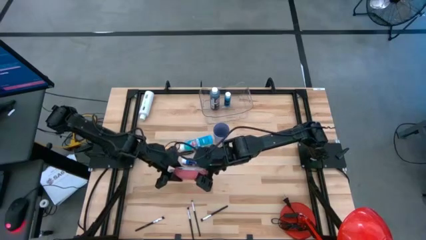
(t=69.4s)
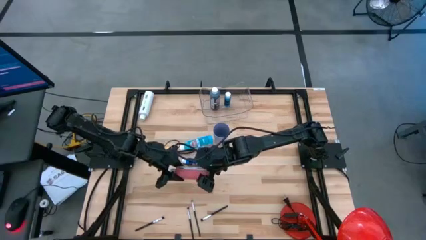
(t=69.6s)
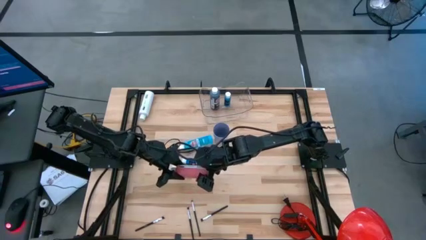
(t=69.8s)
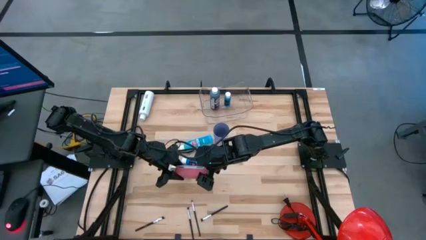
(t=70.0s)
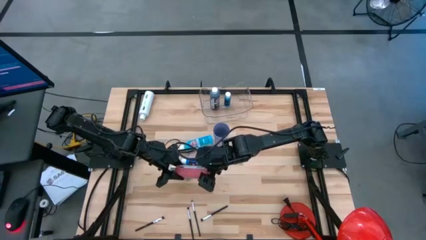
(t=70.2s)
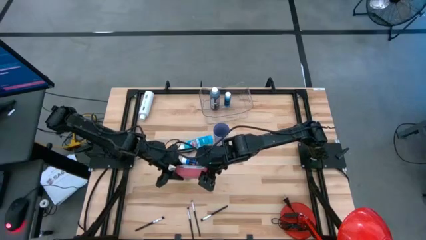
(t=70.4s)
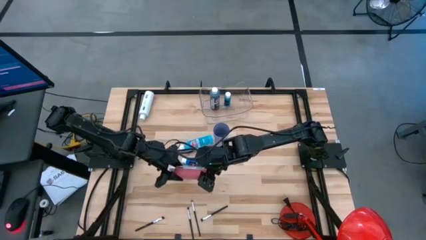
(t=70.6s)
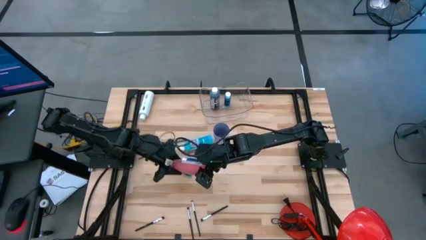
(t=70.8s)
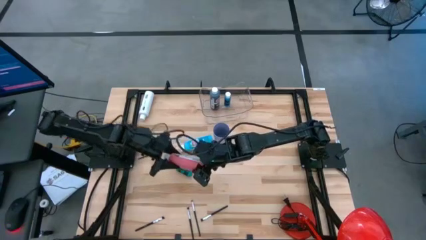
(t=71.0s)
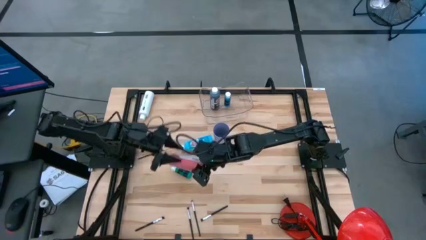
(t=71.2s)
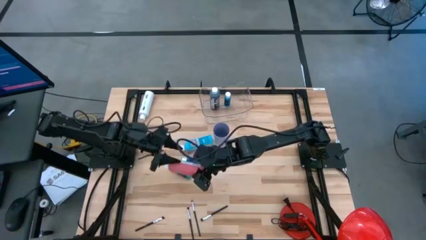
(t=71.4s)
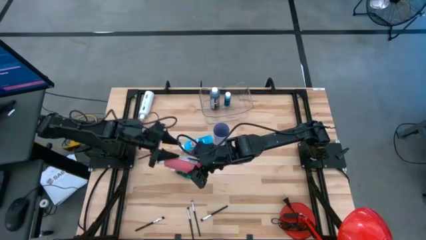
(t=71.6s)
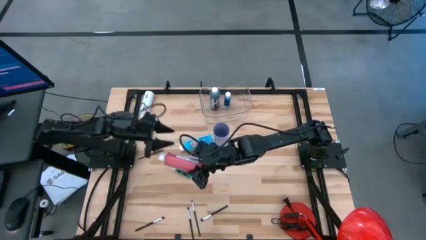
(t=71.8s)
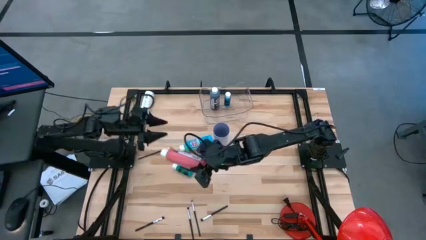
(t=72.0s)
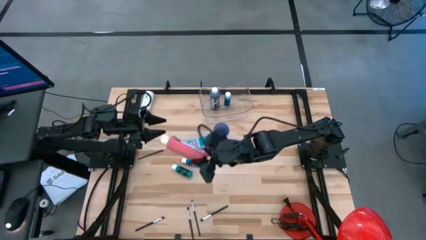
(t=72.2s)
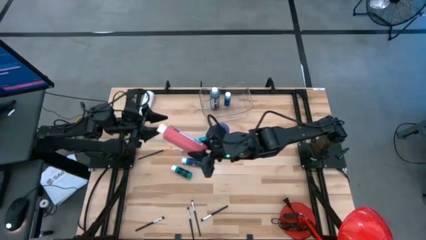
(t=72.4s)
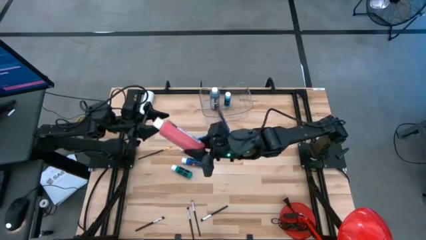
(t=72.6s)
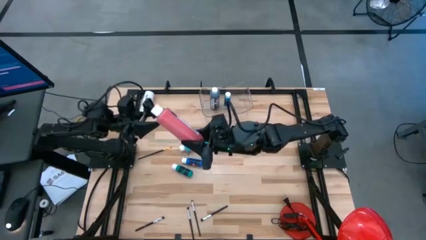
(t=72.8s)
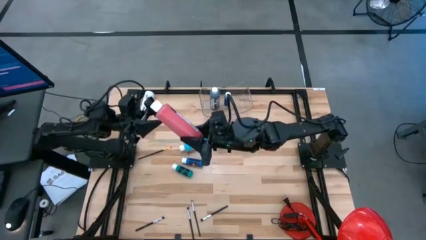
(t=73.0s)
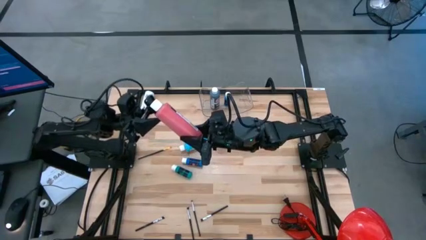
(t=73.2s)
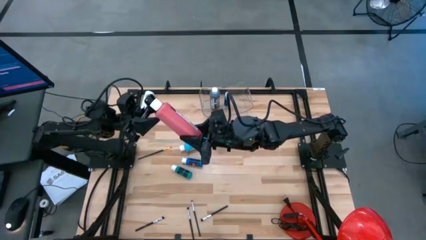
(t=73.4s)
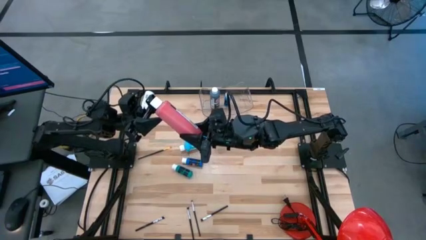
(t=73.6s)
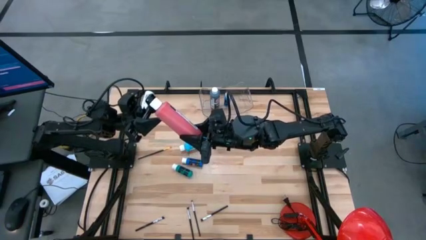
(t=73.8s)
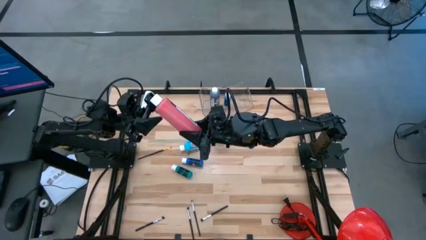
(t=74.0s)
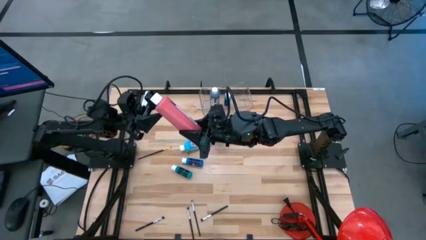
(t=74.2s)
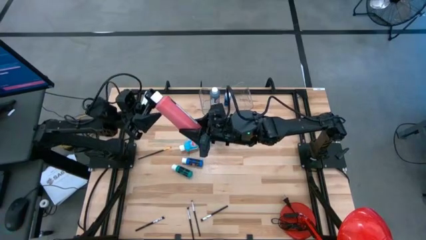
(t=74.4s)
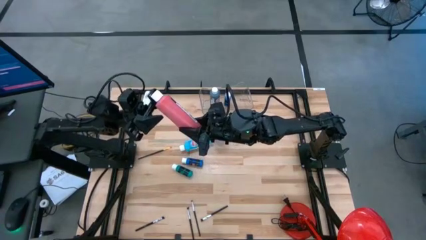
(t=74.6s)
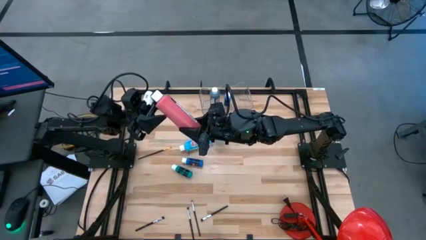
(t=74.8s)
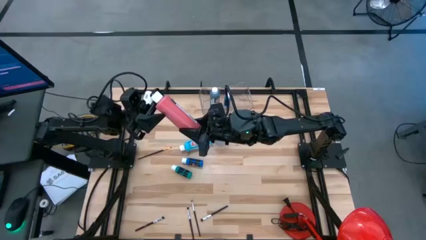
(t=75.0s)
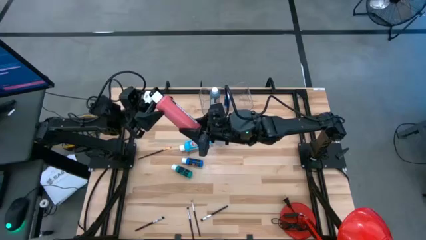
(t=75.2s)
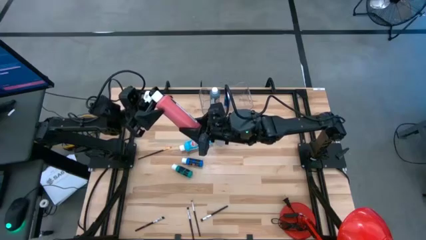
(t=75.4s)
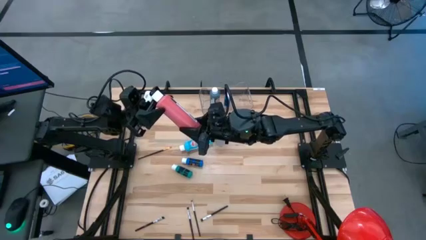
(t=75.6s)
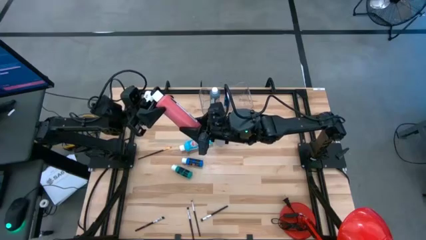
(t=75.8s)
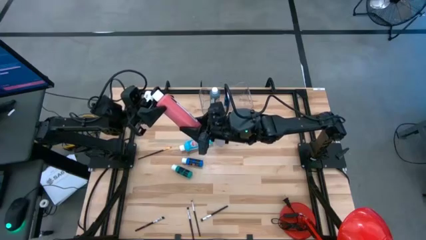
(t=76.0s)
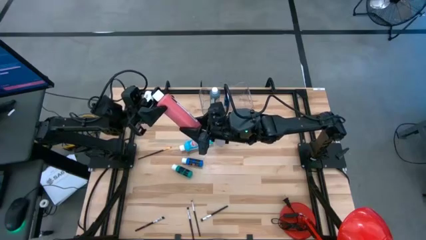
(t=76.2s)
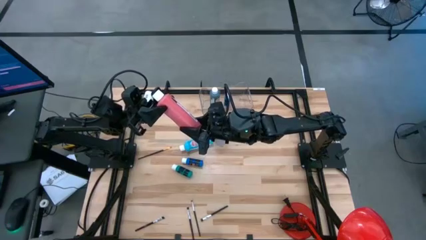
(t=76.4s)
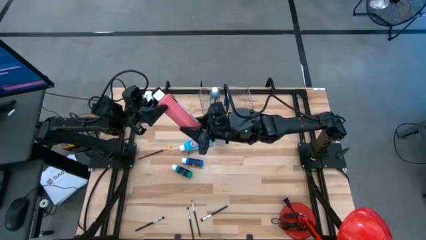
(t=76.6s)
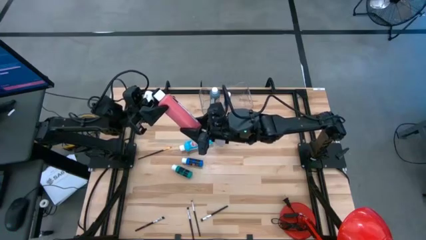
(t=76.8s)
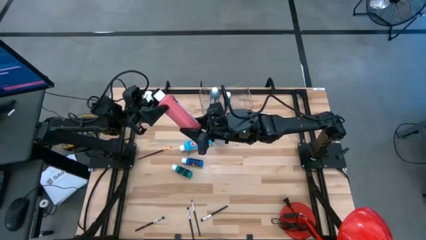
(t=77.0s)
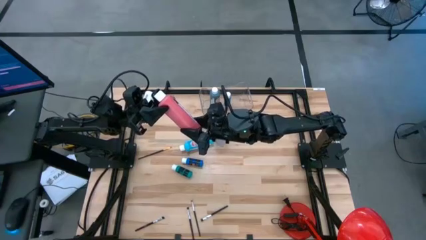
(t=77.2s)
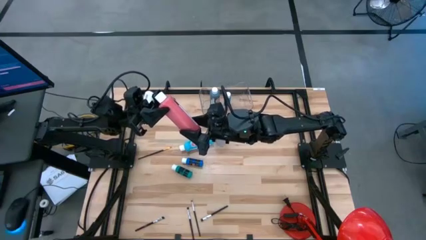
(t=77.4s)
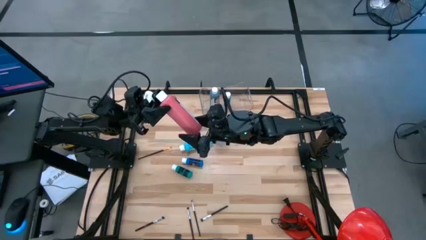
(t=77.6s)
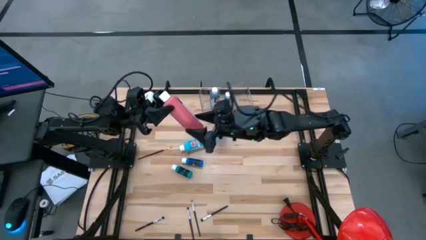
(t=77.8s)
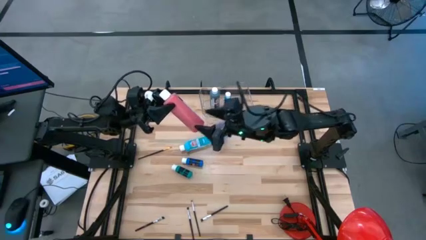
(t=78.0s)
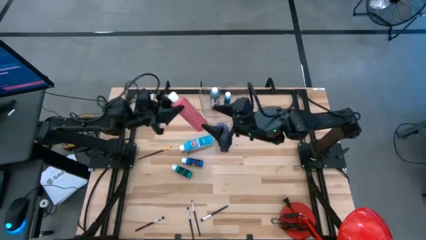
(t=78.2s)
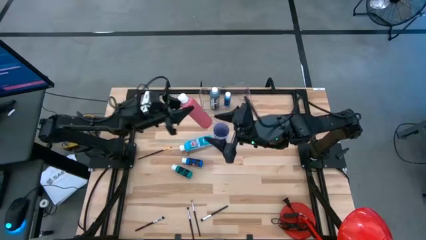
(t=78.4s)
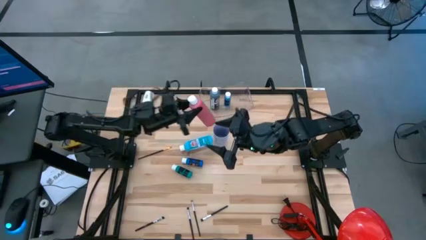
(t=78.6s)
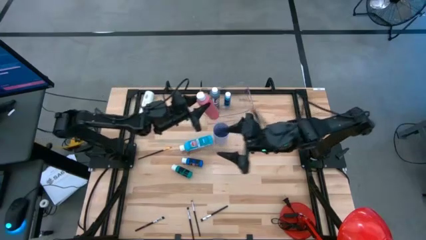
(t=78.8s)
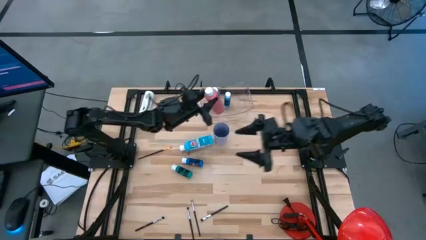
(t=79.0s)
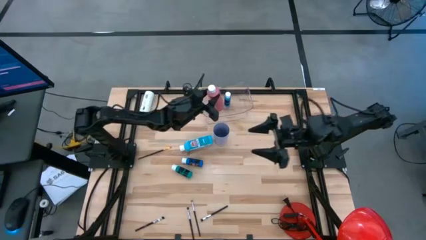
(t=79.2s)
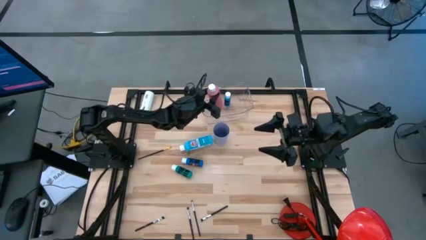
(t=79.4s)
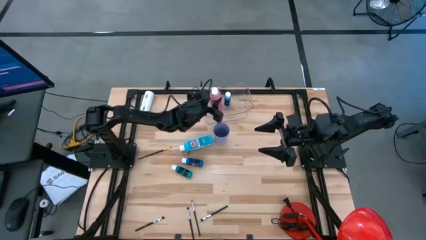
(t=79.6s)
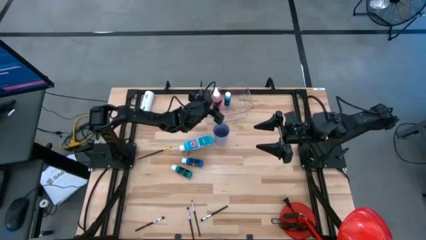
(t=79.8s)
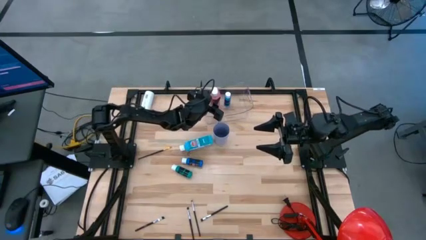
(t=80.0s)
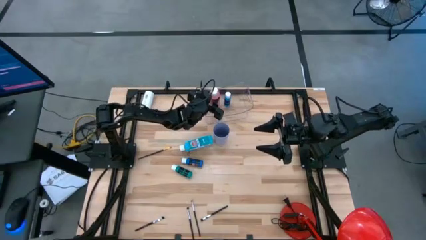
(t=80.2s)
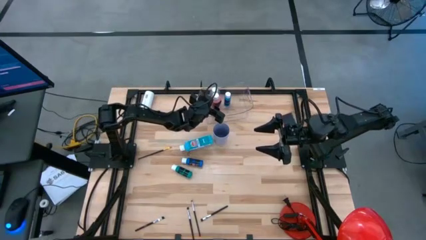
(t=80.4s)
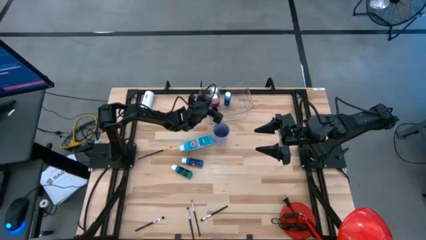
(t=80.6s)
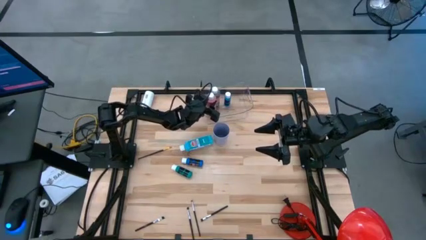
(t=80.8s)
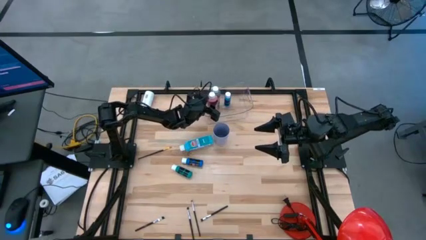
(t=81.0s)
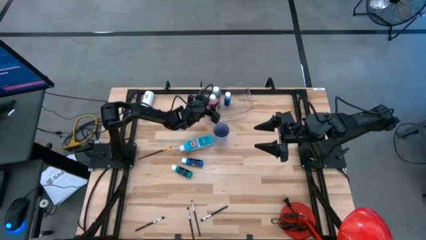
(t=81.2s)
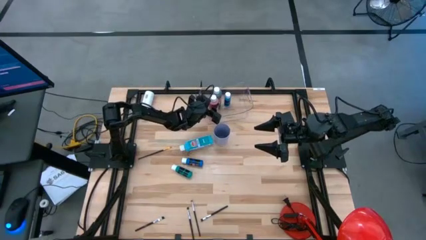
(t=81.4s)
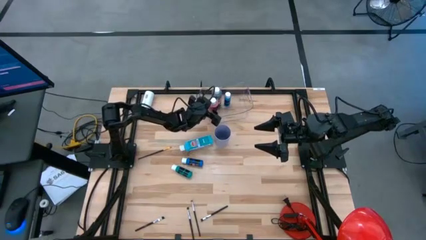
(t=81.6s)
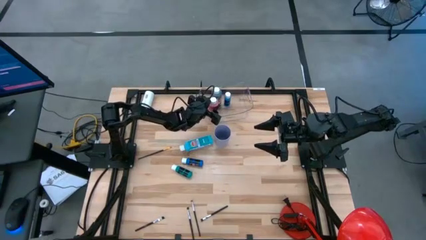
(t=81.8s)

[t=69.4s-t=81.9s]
Task: Pick & Place Paint Supplies
Put the red paint bottle into the transparent bin

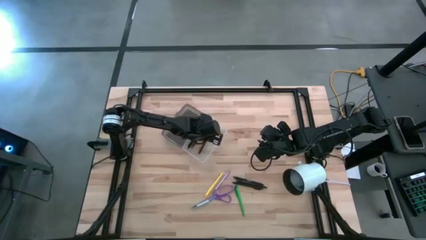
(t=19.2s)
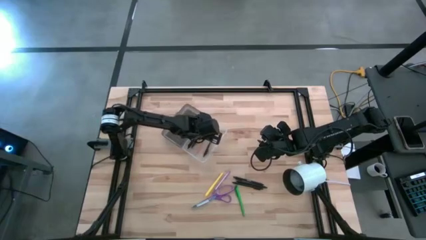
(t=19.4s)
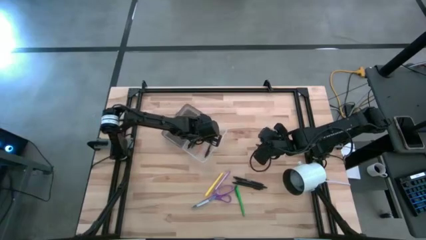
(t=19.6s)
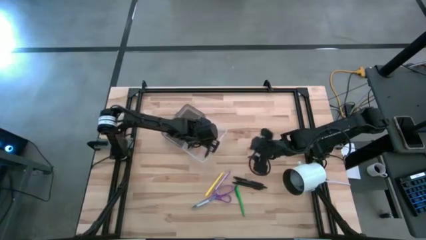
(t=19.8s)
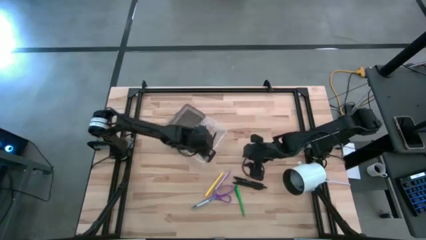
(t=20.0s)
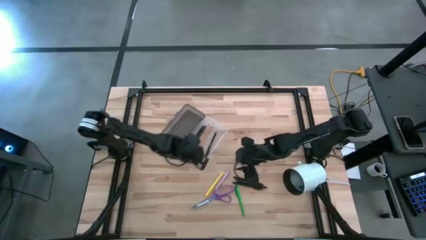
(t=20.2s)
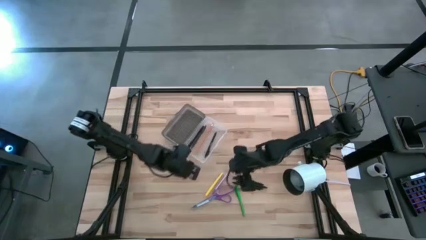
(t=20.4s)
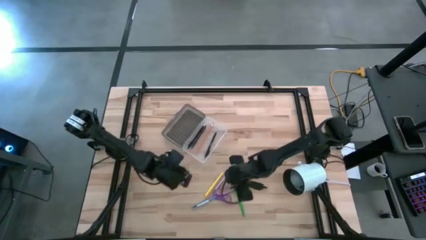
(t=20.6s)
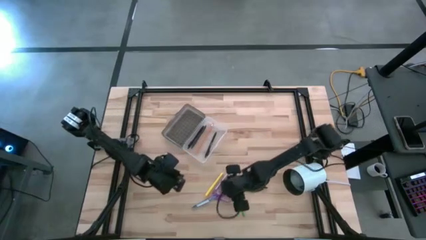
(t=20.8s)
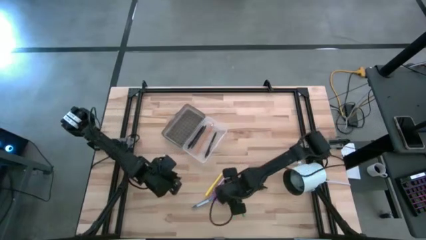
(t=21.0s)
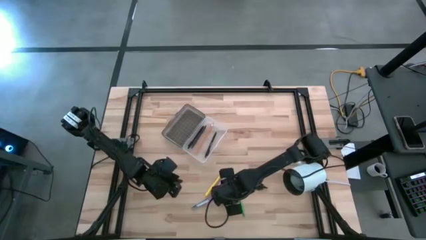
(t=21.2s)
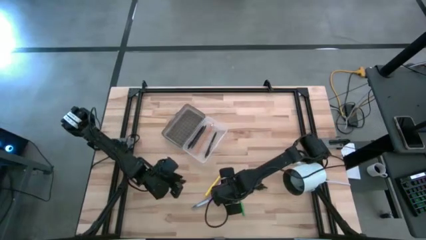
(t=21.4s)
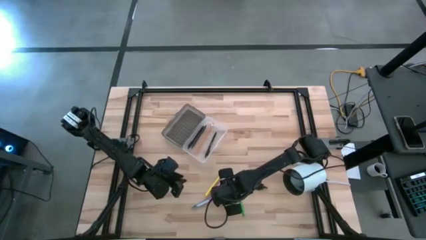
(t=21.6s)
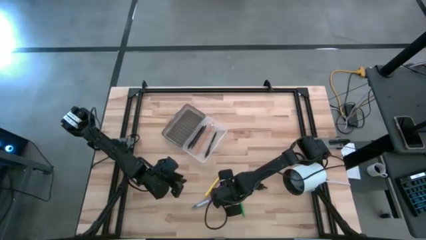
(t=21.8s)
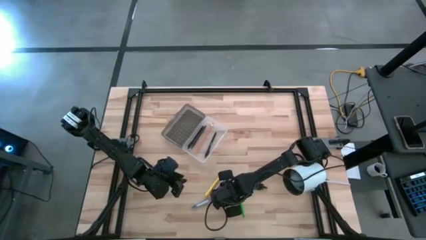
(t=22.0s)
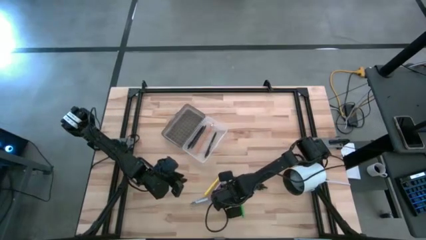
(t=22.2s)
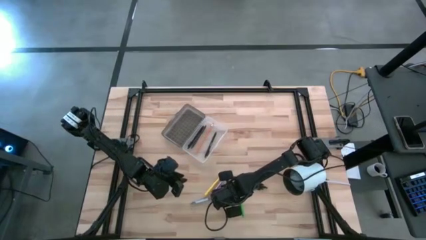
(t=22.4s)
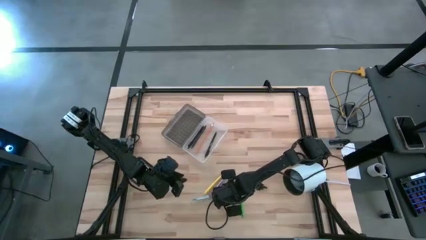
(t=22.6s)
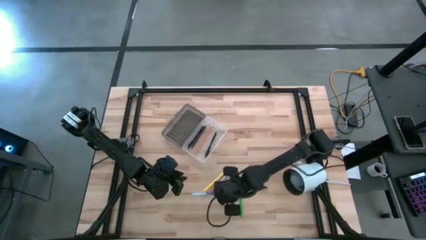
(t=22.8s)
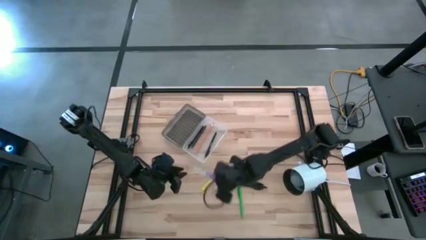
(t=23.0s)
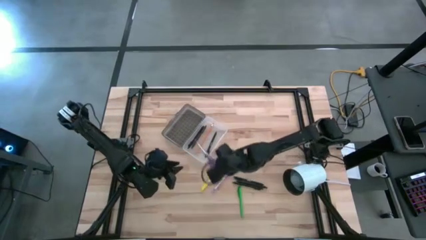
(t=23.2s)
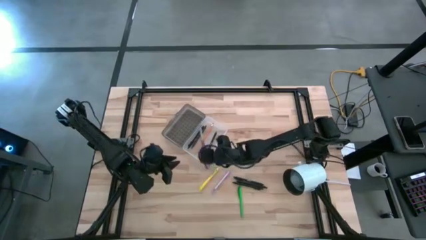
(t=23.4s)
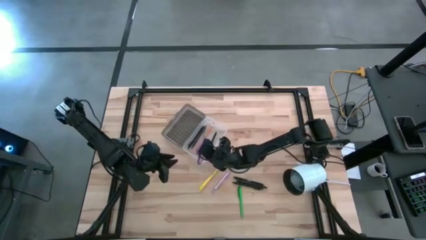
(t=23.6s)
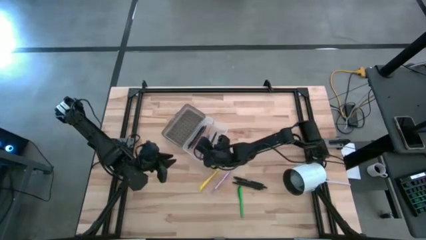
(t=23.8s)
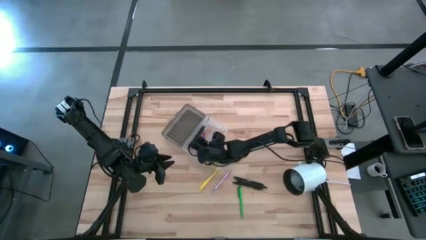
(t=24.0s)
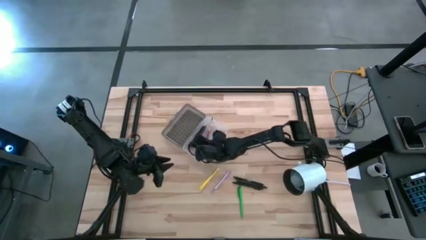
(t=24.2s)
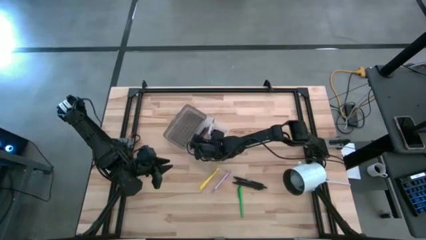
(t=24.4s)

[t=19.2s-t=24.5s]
Task: Pick & place school supplies into a supply box
Put the purple scissors into the black supply box
